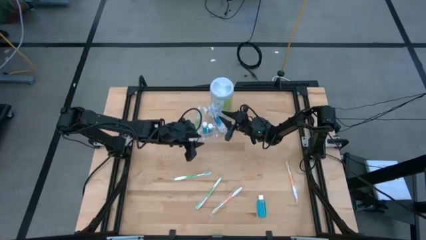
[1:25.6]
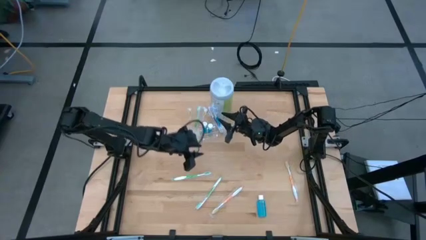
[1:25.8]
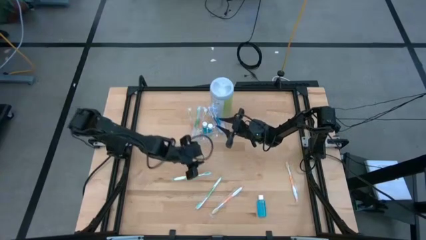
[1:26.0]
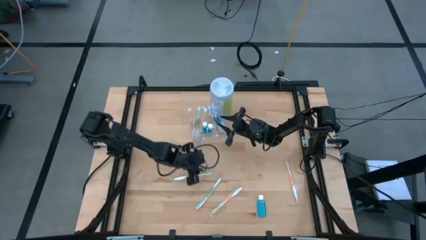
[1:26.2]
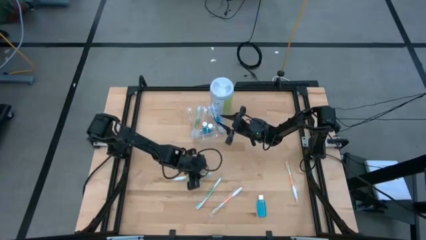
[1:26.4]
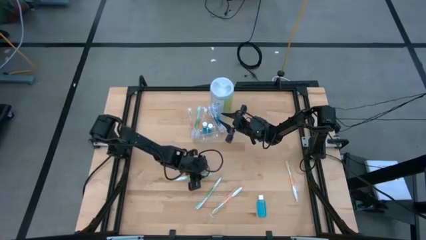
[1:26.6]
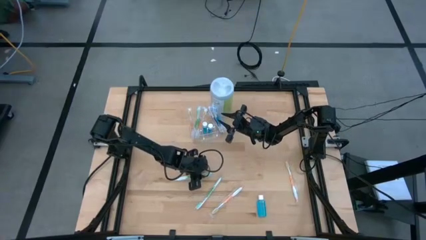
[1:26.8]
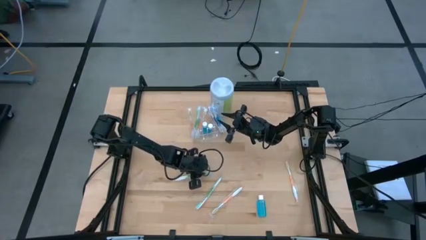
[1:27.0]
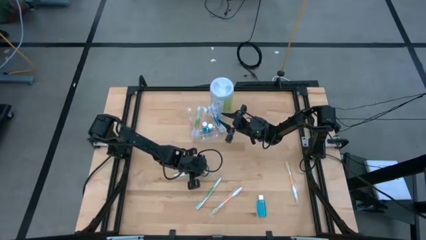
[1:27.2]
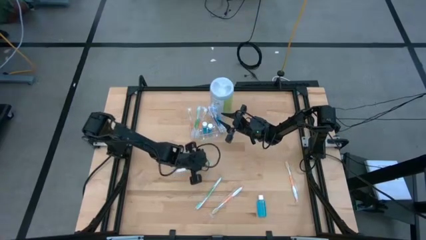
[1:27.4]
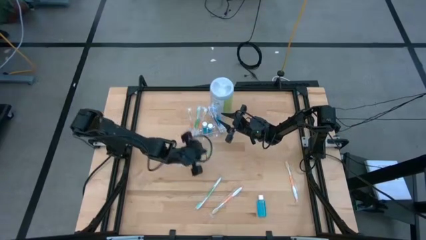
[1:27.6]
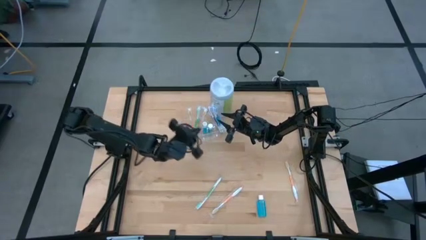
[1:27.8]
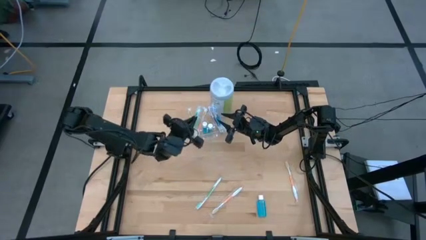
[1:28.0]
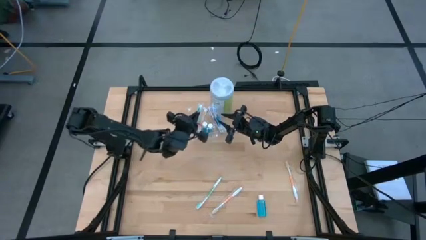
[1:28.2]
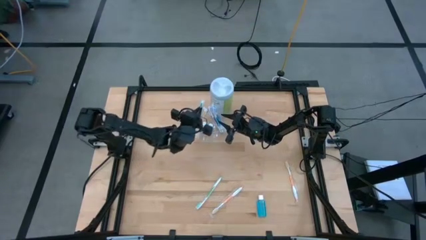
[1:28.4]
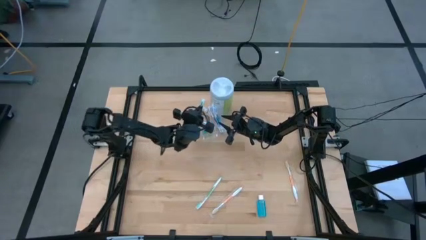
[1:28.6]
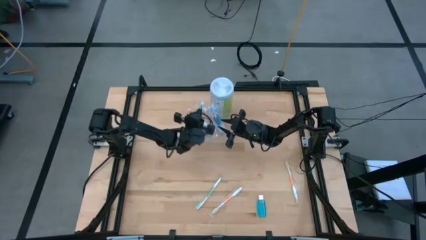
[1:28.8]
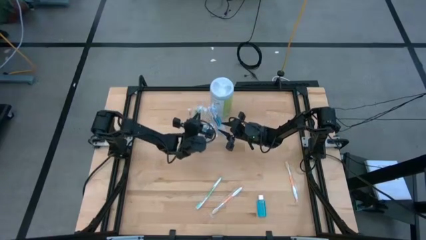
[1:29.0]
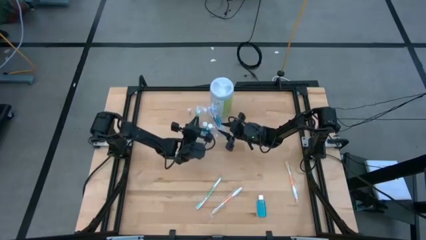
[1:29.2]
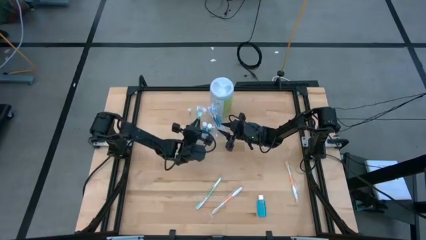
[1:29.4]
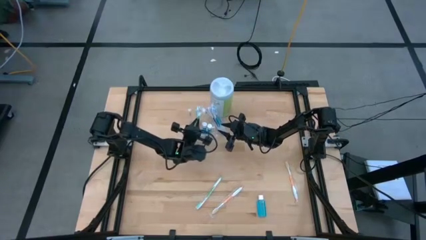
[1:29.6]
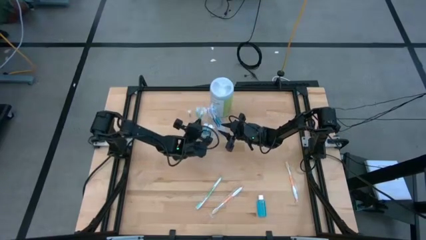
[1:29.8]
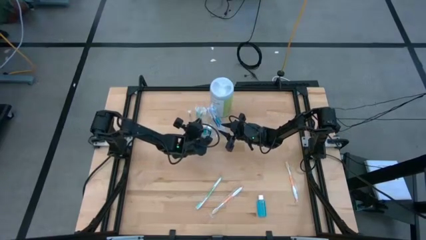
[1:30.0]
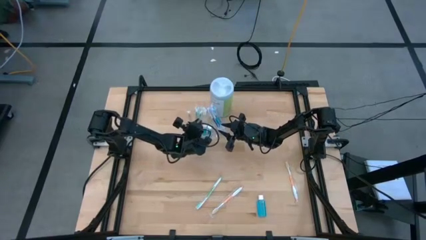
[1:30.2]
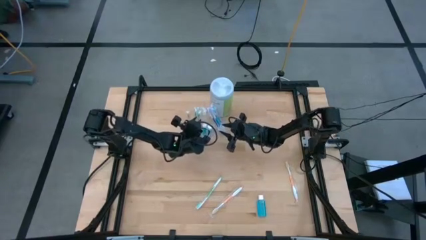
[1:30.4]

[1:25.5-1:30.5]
Task: Pick & Place toothbrushing station
Put the green toothbrush into the transparent organizer

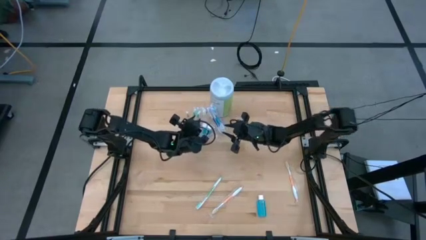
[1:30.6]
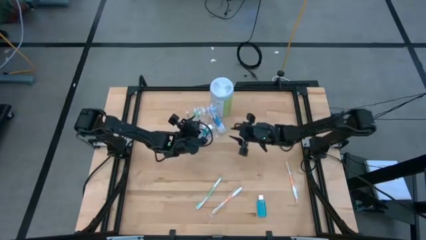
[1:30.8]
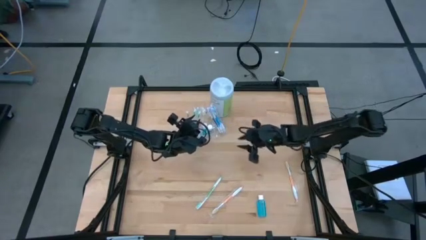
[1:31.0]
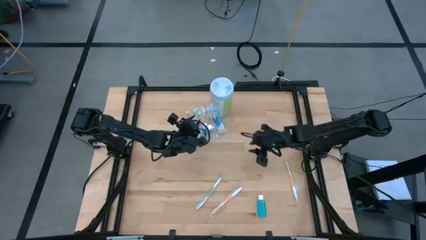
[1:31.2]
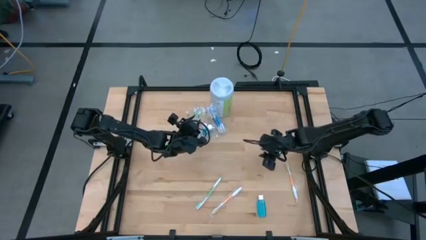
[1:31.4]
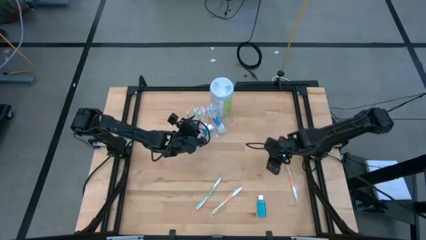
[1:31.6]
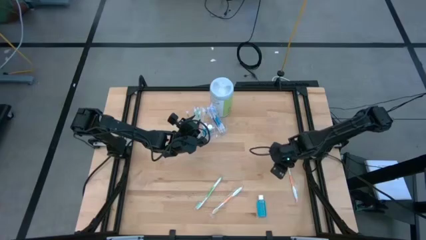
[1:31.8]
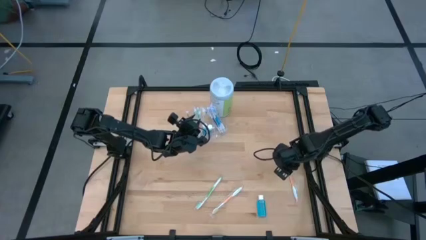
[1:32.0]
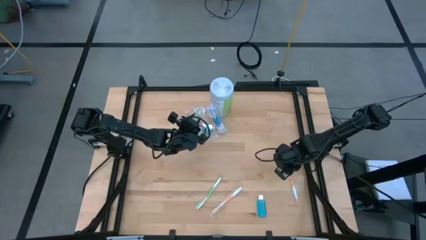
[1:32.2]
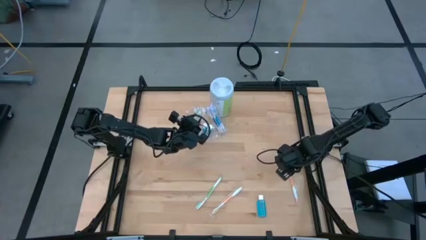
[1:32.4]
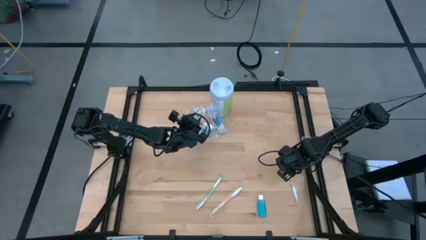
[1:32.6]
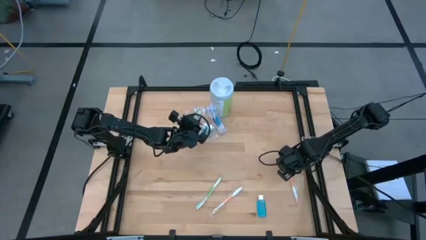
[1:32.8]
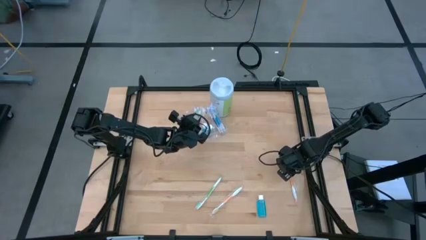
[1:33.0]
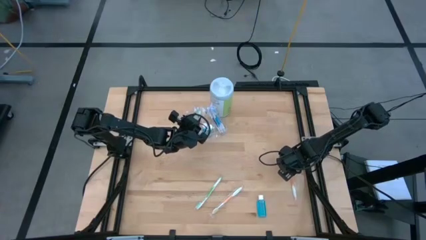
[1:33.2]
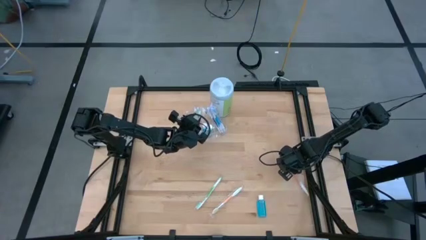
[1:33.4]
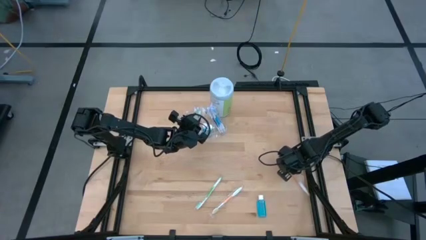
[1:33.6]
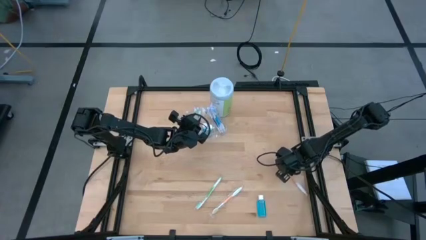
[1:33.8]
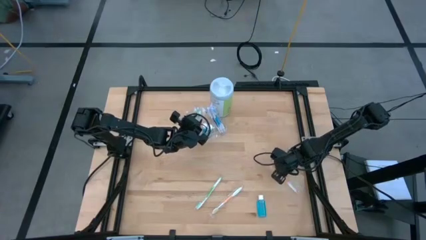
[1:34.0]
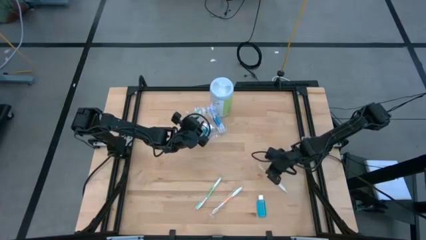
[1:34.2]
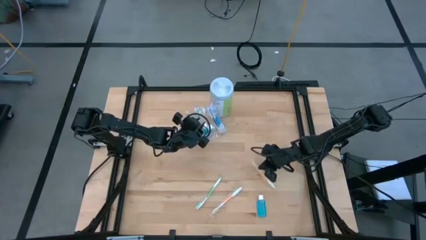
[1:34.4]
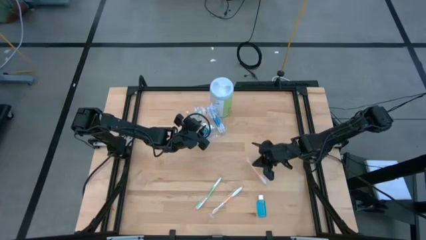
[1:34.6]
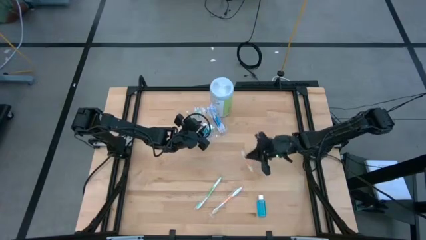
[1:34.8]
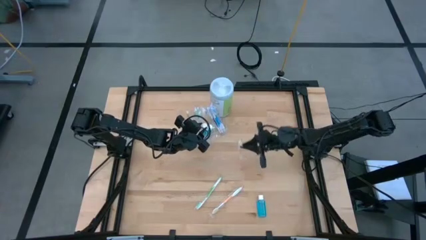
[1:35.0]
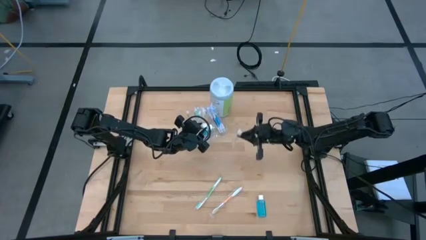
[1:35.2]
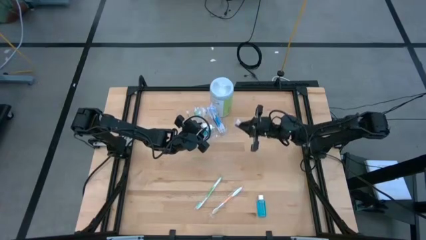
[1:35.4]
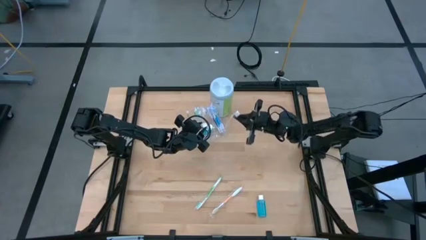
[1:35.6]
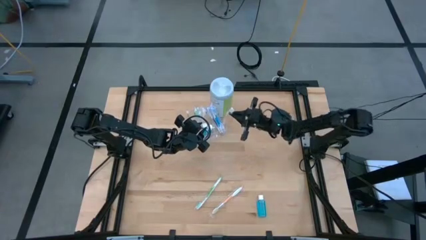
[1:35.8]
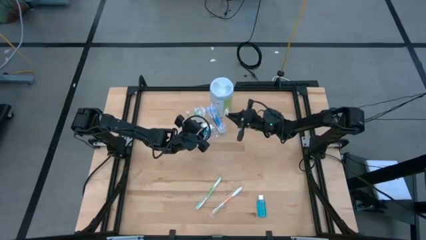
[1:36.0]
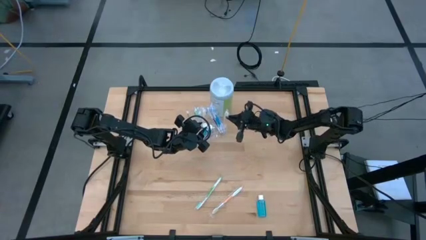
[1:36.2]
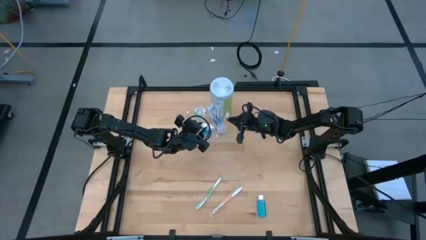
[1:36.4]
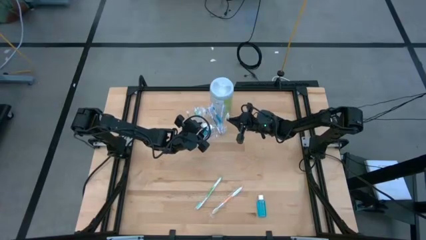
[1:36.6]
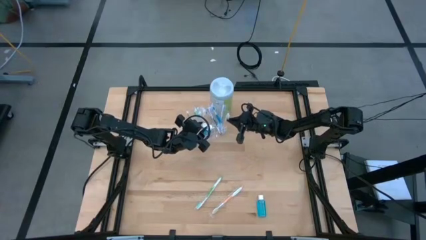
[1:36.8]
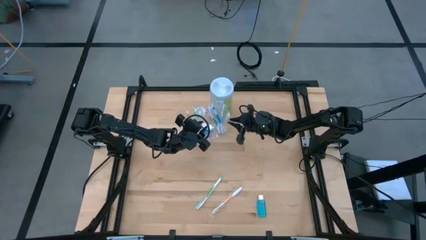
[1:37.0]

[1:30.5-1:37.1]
Put the yellow toothbrush into the transparent organizer

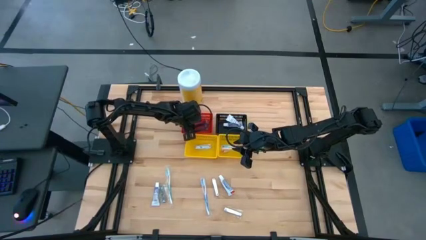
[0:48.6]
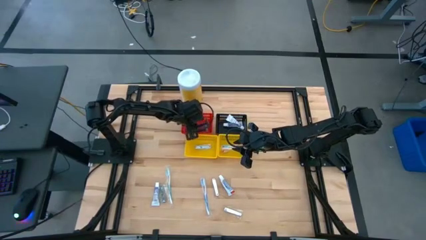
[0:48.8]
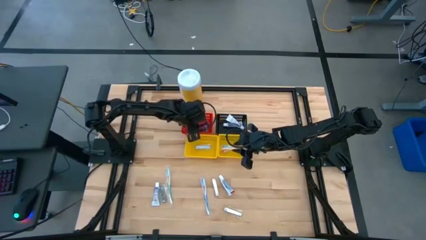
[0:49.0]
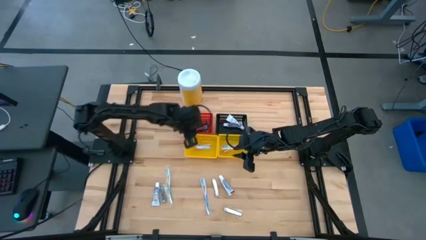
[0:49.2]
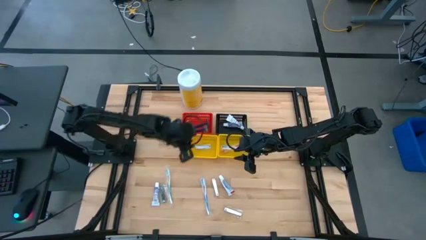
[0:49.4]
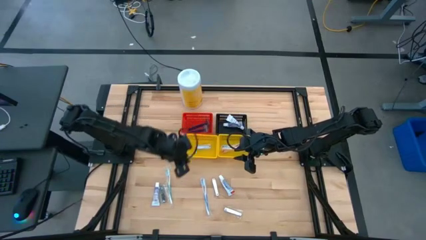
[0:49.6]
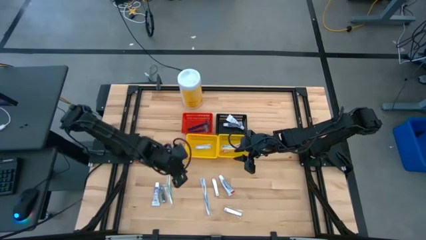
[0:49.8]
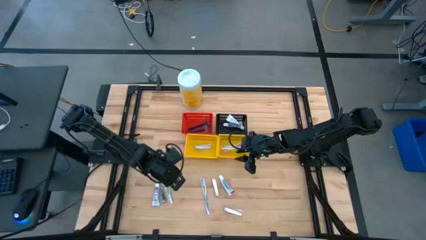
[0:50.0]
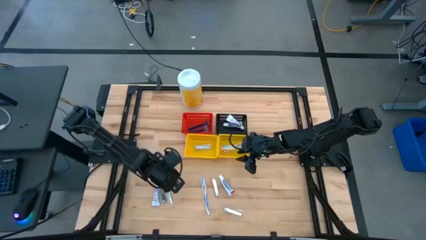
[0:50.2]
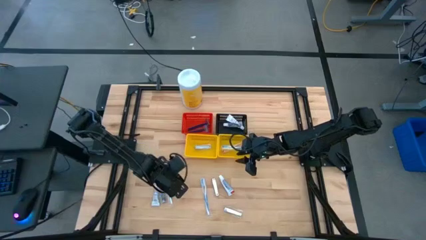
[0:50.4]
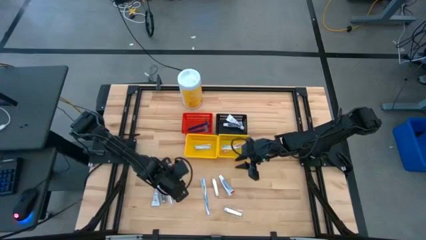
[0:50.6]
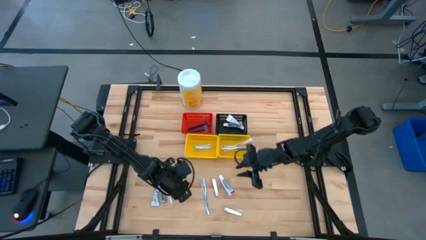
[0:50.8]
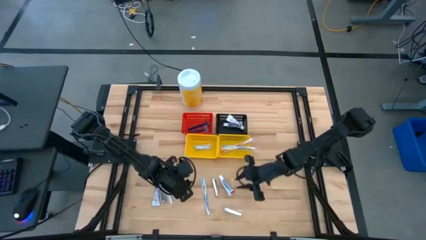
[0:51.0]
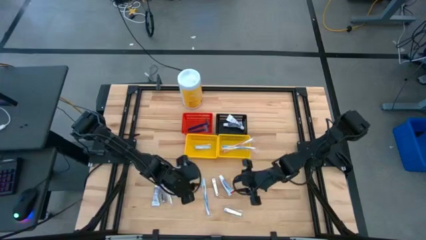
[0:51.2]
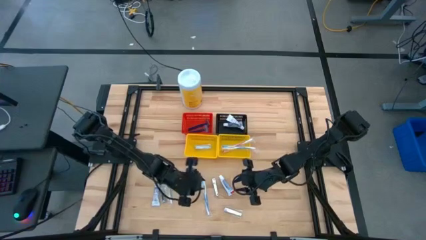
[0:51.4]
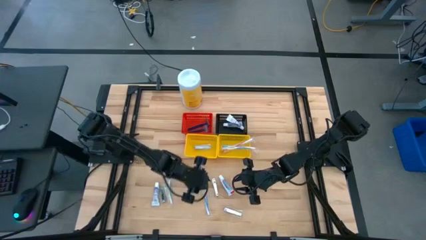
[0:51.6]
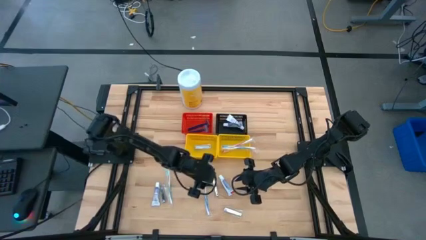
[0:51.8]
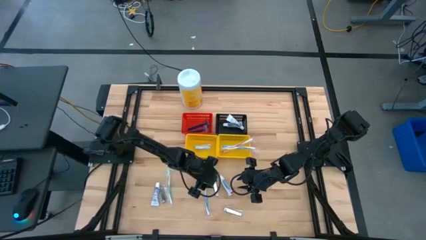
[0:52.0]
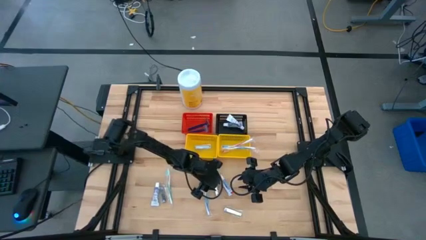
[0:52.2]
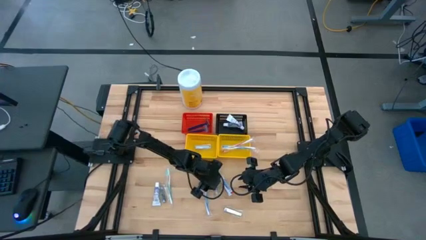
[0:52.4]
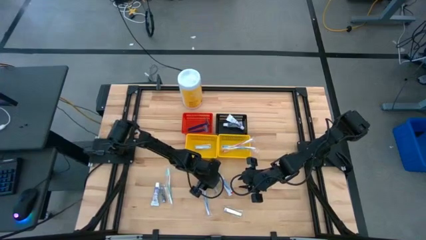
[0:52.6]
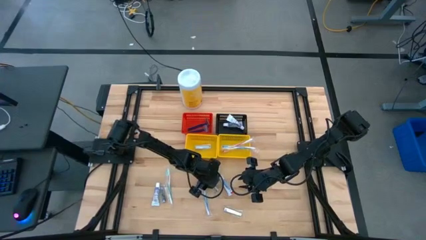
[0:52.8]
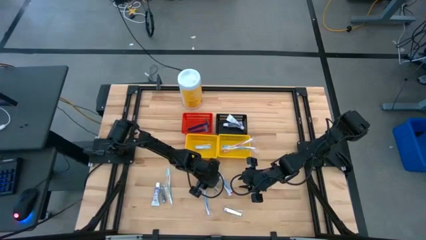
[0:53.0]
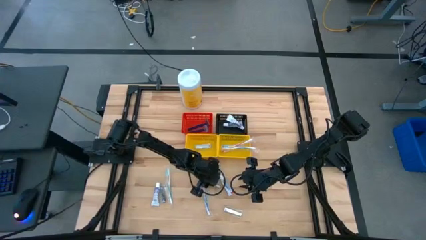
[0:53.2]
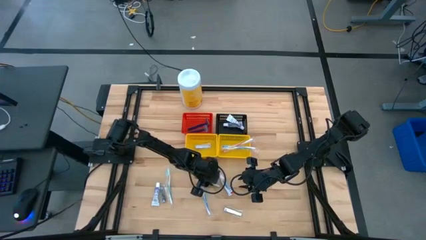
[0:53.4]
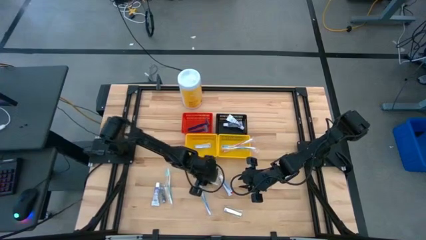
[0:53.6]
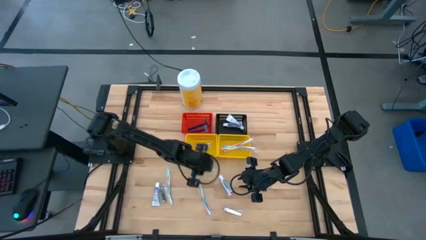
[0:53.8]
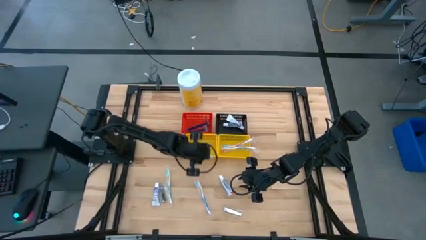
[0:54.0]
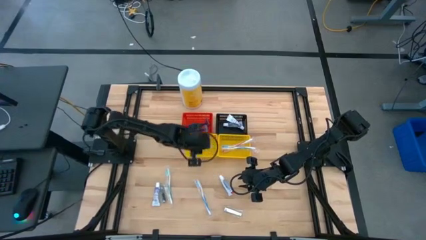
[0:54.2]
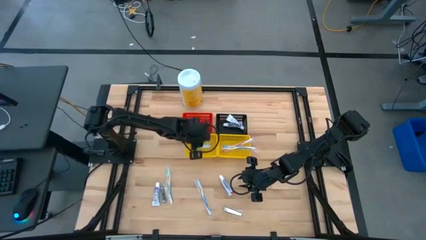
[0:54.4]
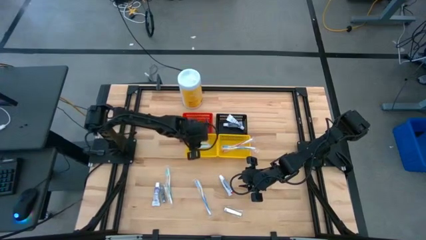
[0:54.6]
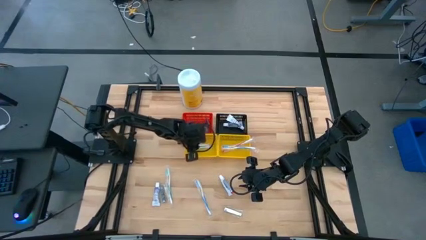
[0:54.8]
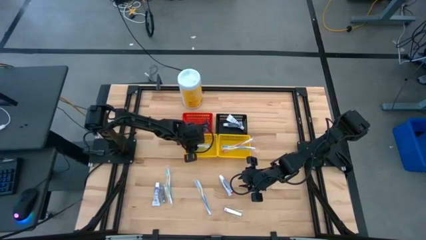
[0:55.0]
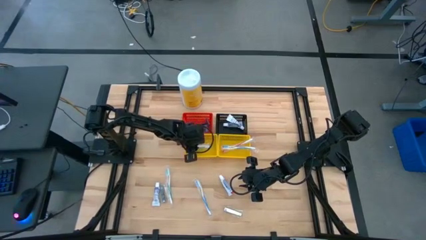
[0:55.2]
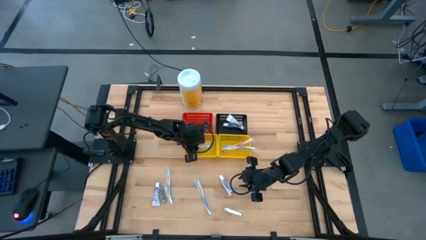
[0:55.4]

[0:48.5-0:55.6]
Task: Pick & Place Travel size toiletries
Put the silver nail cutter into the left yellow bin
